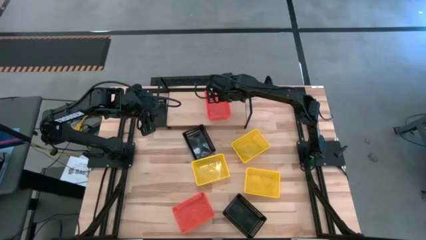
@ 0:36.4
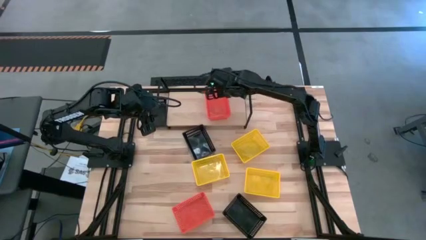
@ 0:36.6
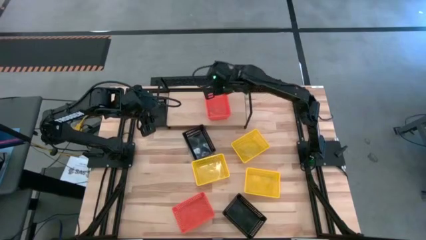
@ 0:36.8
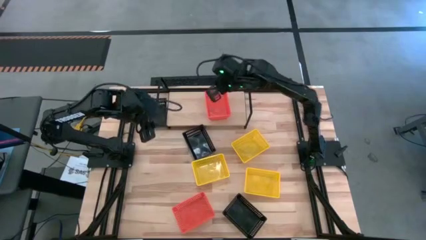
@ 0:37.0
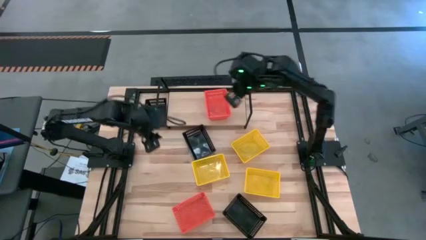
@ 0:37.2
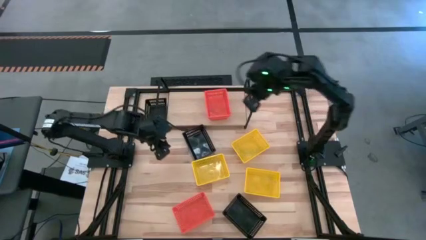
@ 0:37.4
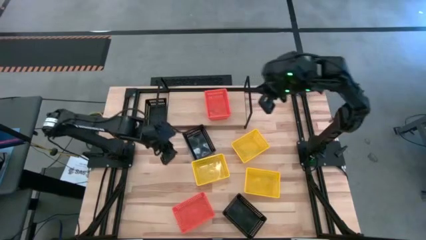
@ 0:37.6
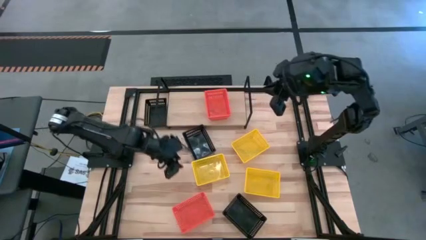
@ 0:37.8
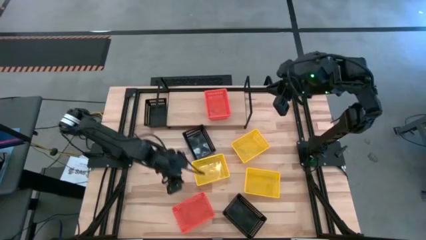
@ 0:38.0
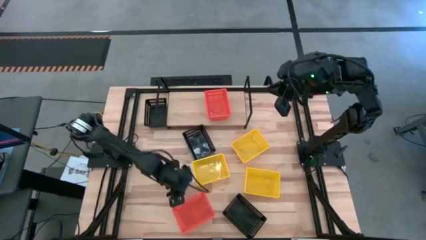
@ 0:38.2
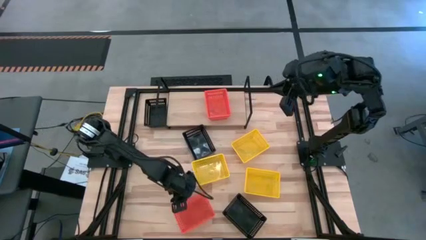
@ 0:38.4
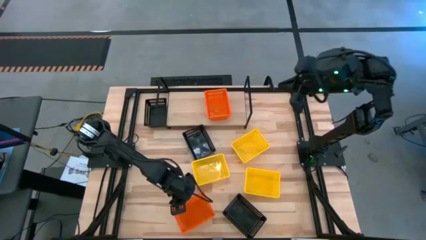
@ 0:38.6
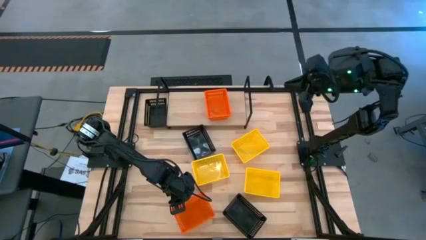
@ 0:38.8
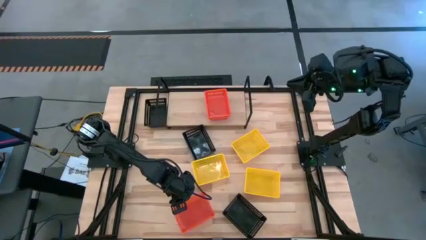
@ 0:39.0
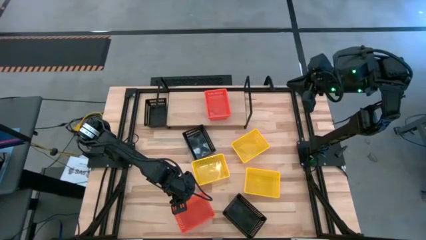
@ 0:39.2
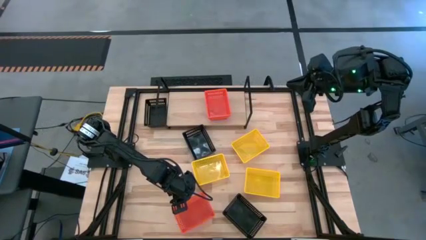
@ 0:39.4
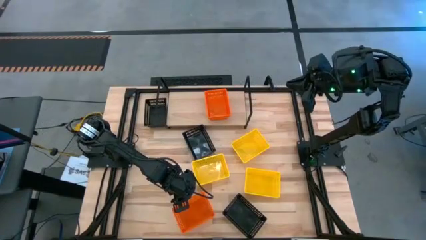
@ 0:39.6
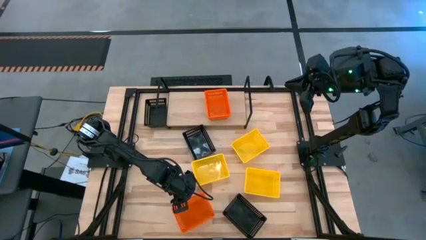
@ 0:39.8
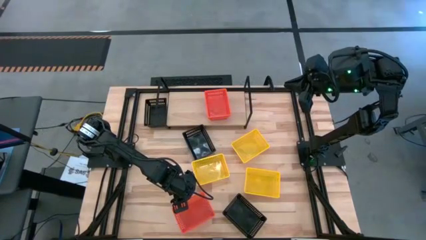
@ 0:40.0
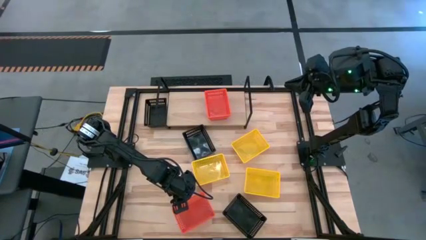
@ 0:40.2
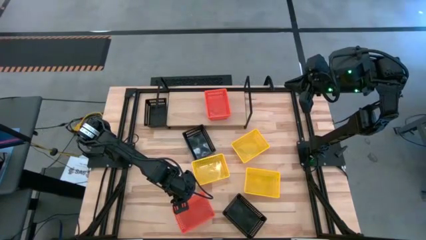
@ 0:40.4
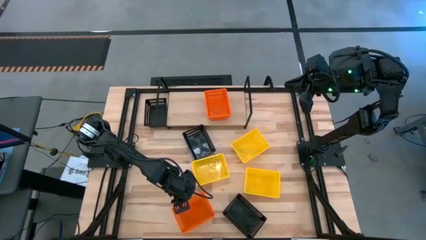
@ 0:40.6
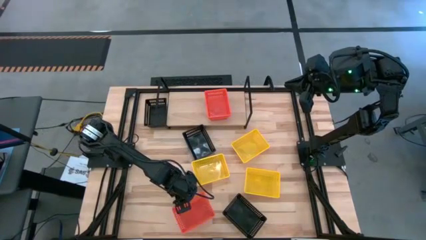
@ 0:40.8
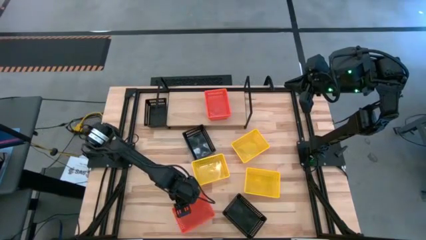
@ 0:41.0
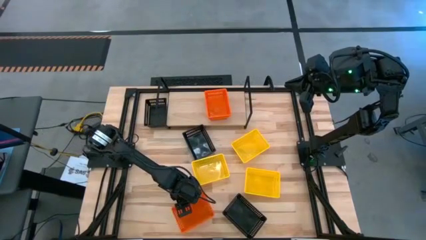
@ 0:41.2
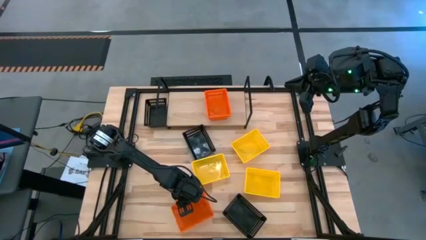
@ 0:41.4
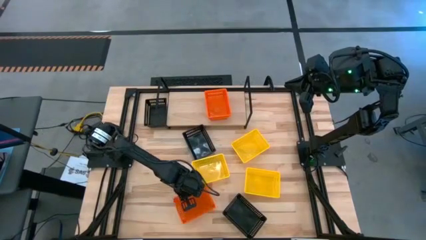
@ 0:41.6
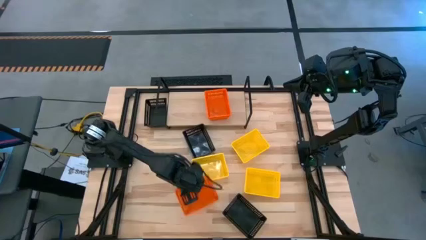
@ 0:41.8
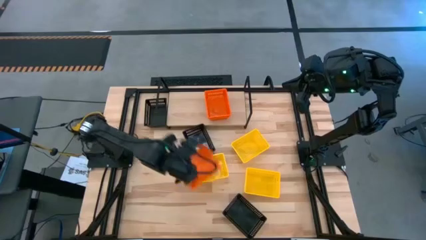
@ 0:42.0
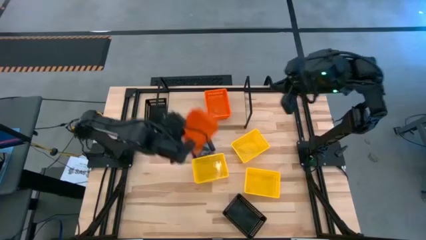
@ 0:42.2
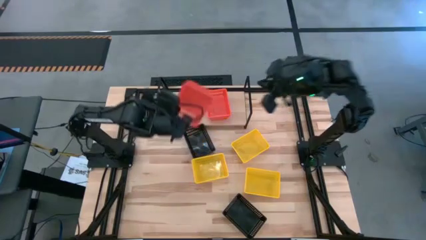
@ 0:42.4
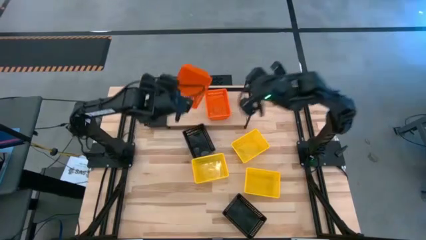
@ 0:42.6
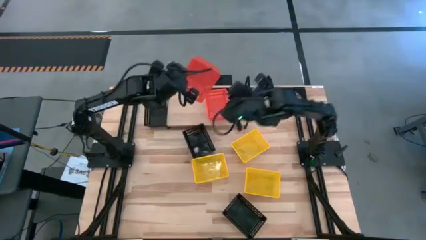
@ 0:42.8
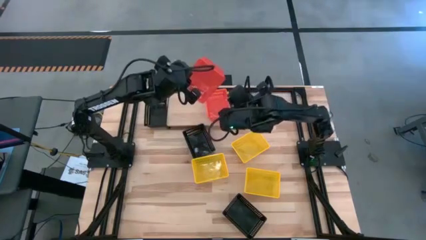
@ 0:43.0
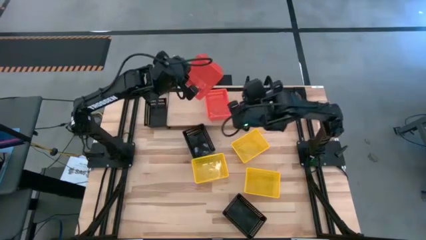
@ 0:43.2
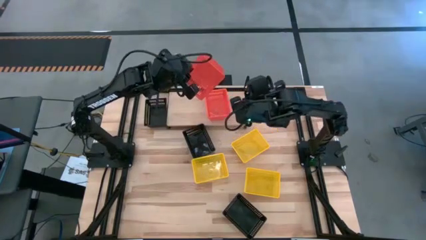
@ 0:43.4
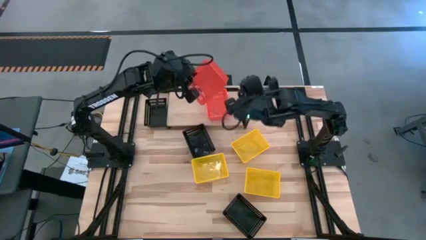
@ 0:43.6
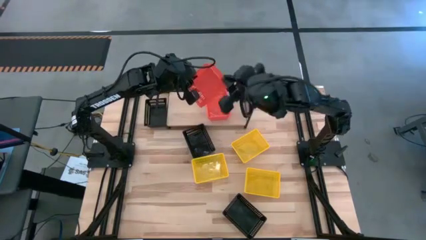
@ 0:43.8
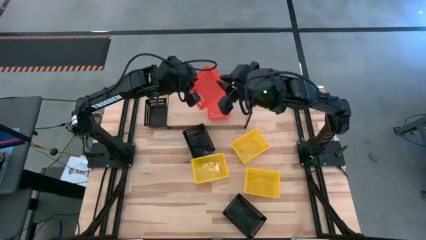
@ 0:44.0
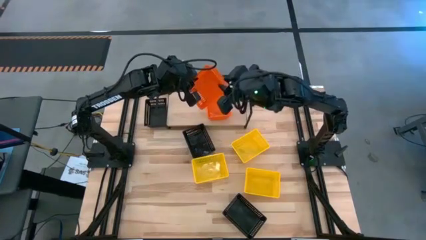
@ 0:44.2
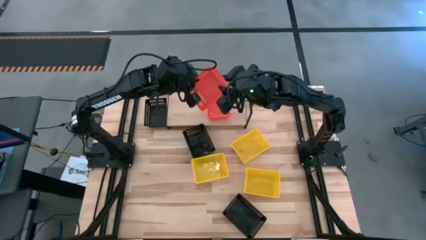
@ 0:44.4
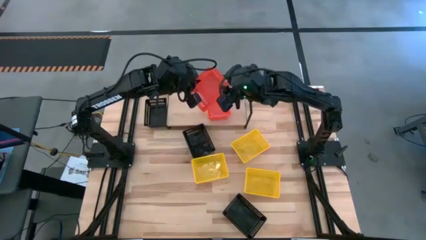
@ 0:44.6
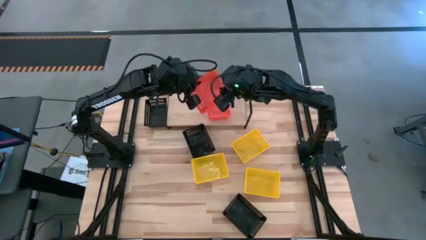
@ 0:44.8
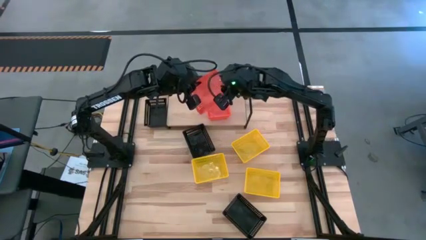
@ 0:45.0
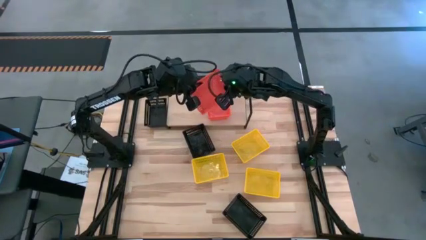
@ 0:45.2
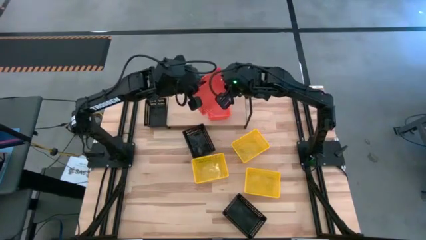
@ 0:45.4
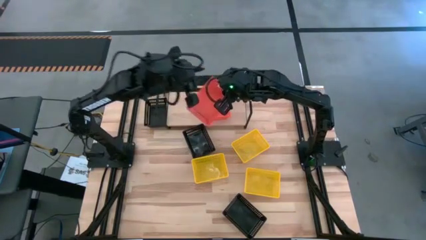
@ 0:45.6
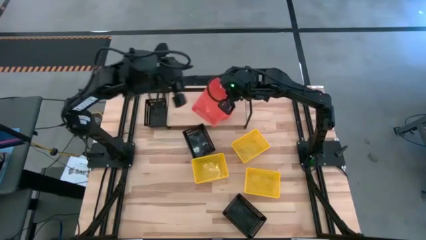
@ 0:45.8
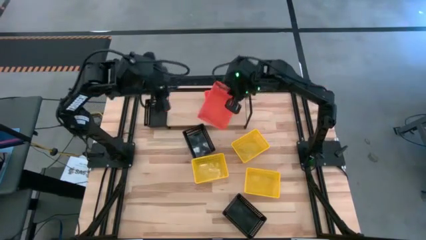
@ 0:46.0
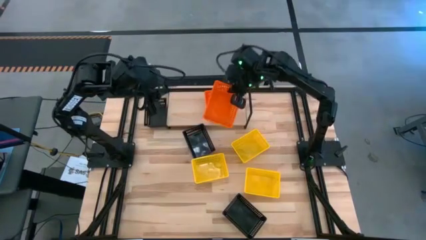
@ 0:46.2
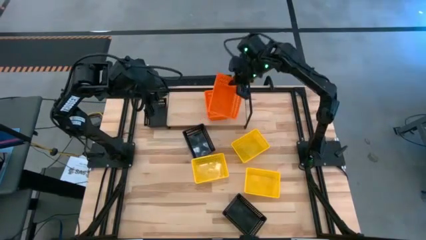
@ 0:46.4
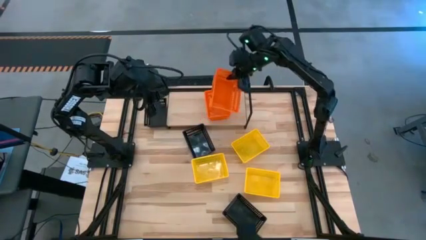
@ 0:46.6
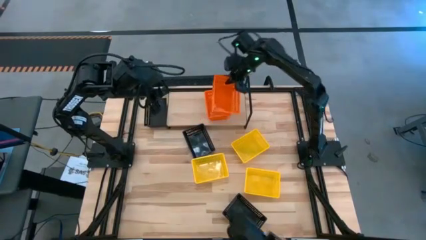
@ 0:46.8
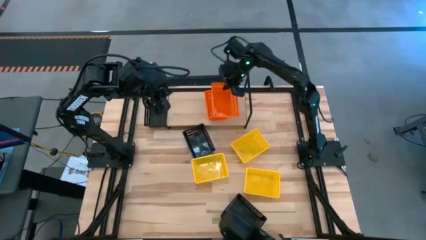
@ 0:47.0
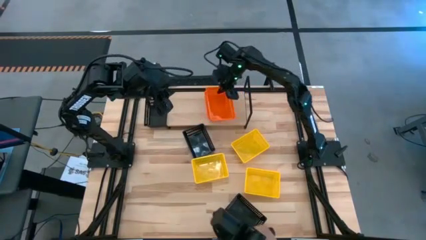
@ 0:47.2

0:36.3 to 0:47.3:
Task: Stack baskets on shelf by color
Stack the orange bin on top of the orange bins on the shelf
